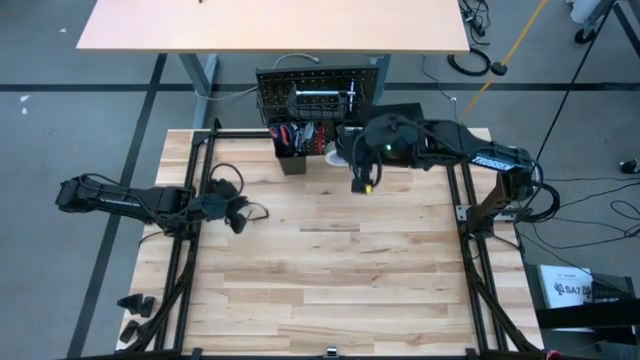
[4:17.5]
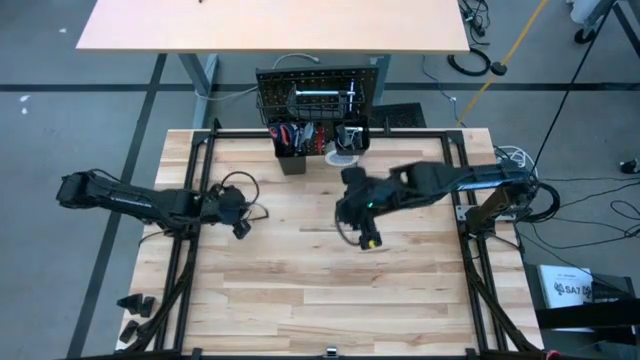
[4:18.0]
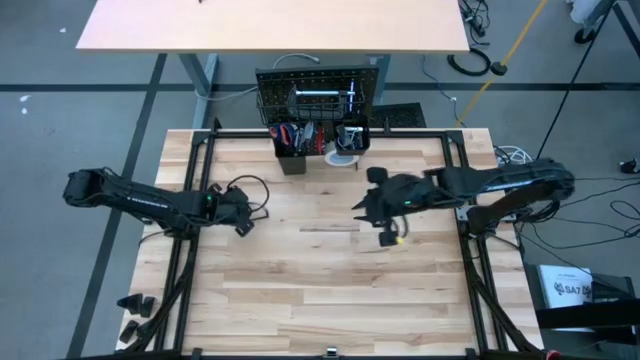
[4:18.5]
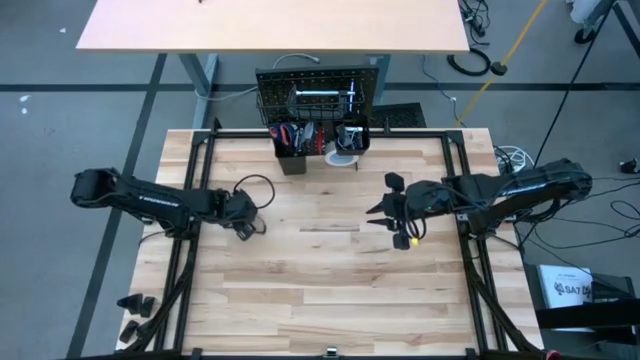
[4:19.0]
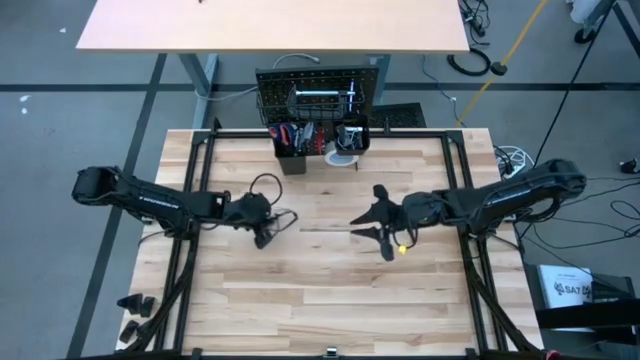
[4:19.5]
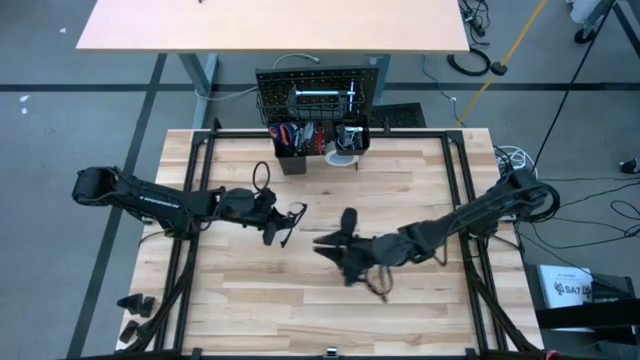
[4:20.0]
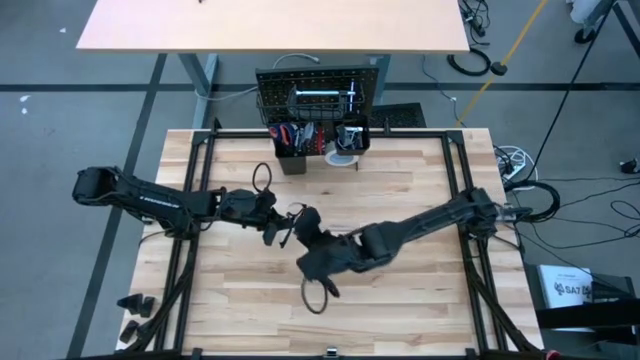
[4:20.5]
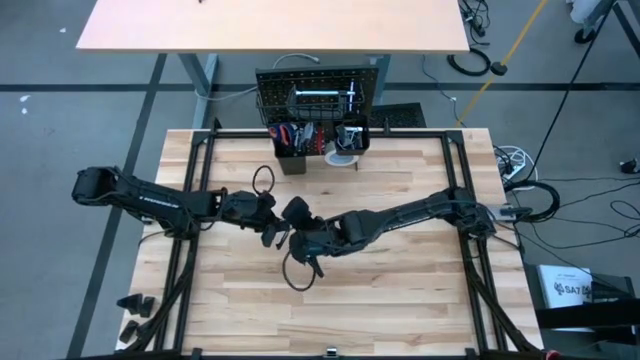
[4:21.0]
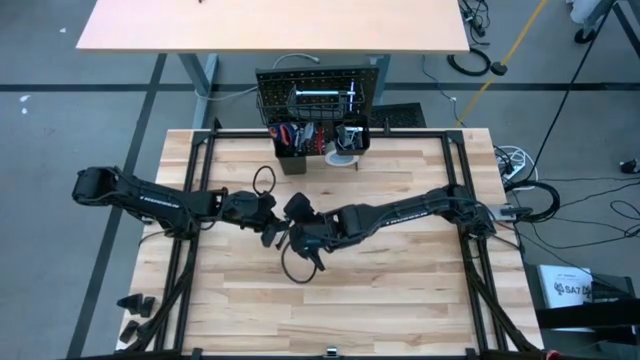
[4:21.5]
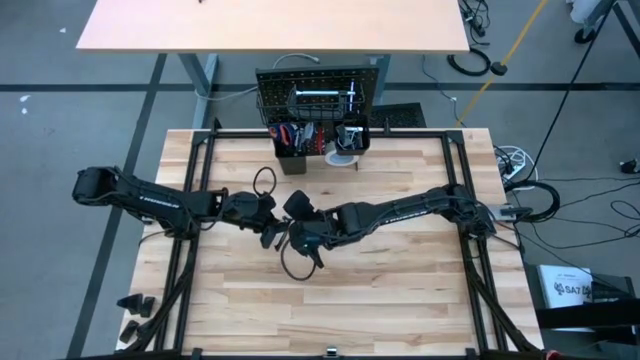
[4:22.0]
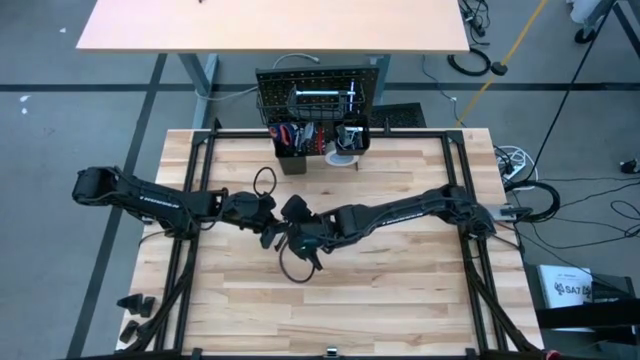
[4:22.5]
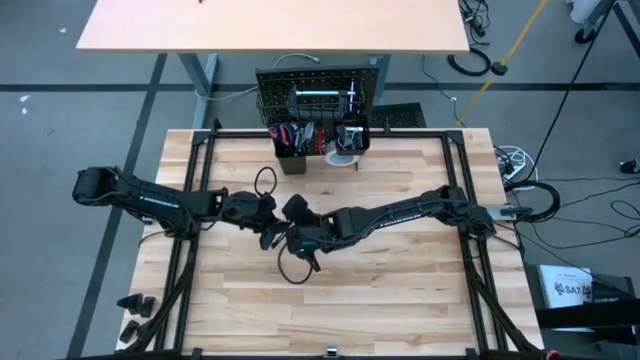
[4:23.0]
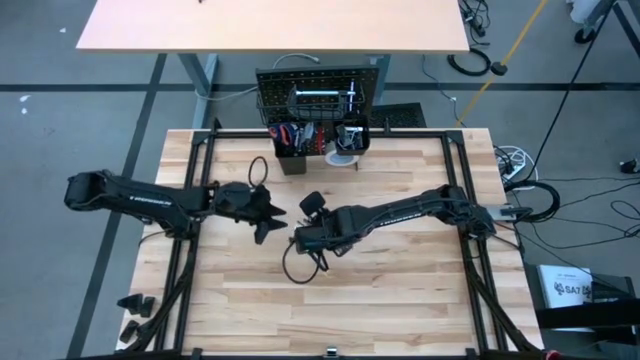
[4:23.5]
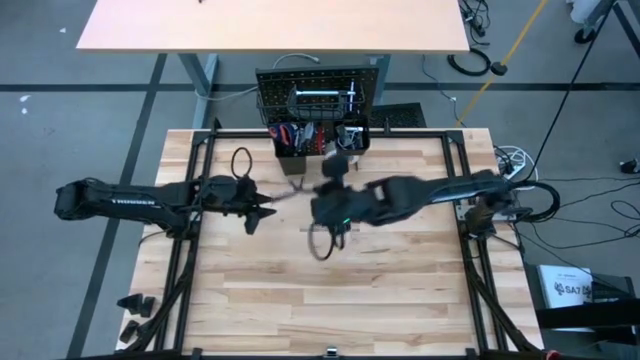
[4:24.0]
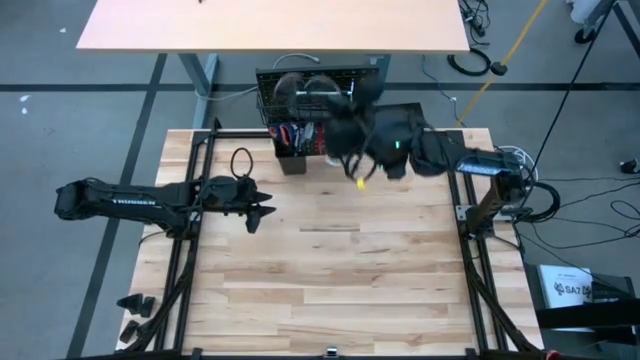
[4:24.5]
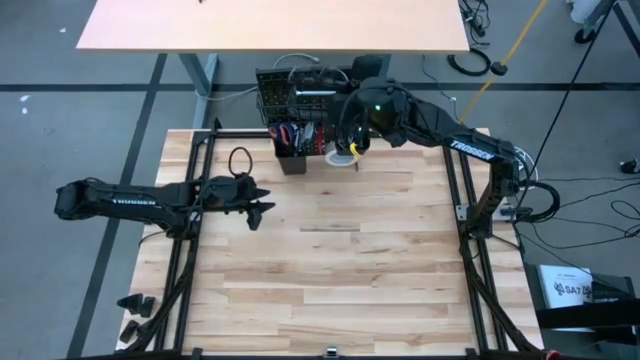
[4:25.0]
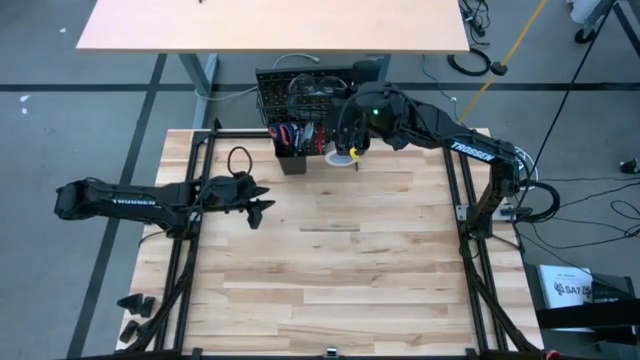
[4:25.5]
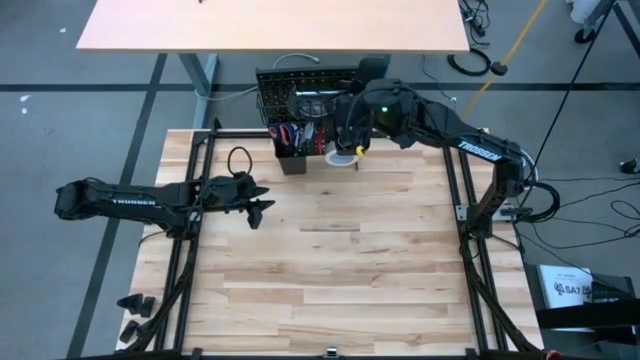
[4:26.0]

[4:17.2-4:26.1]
Task: Hang tools onto peg board
Put the eye glasses on the black basket on the peg board

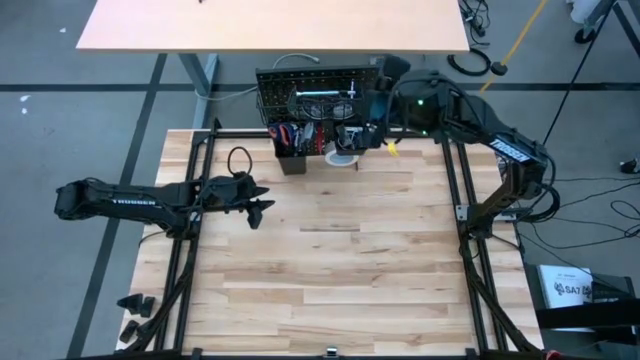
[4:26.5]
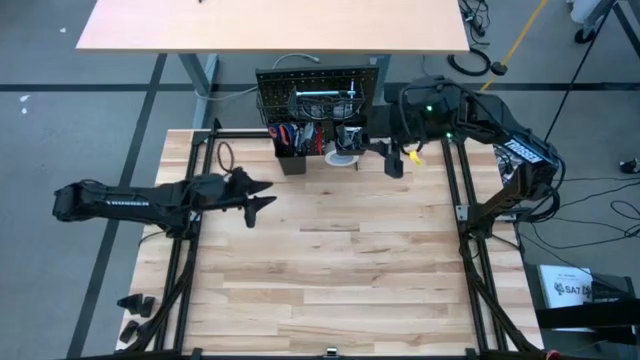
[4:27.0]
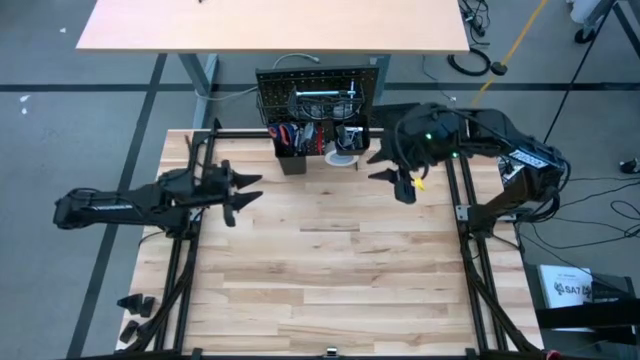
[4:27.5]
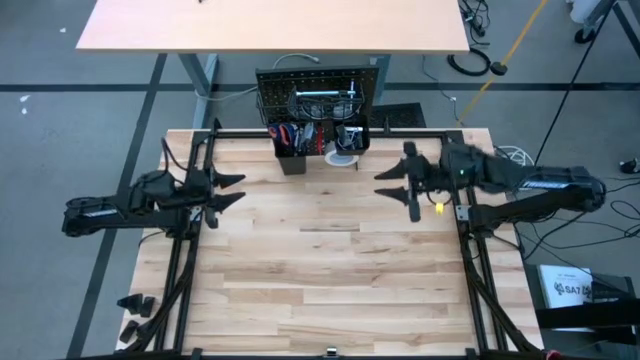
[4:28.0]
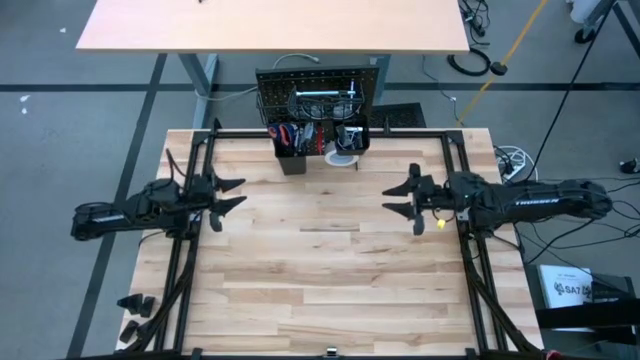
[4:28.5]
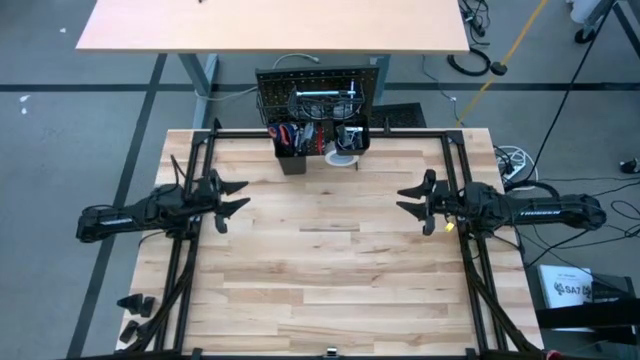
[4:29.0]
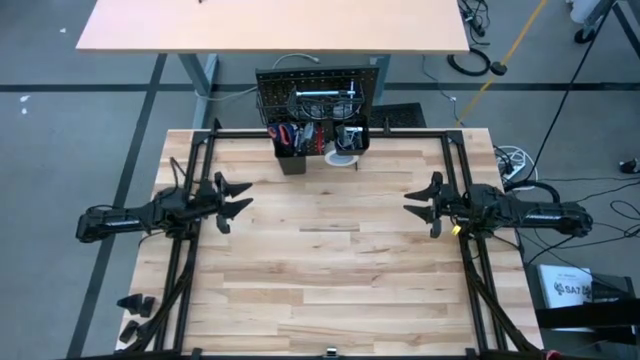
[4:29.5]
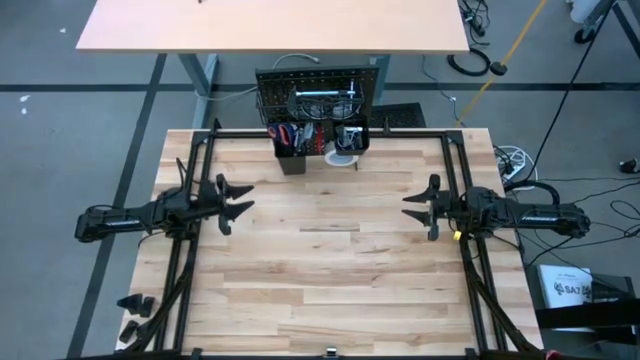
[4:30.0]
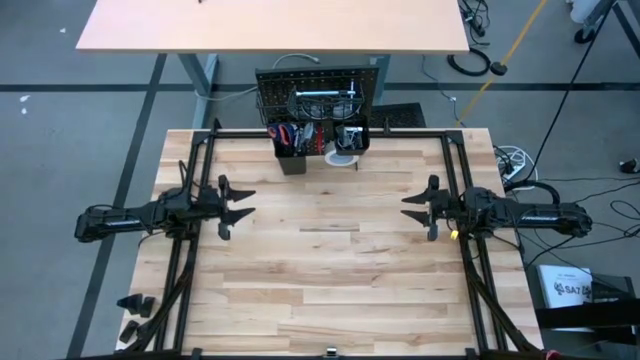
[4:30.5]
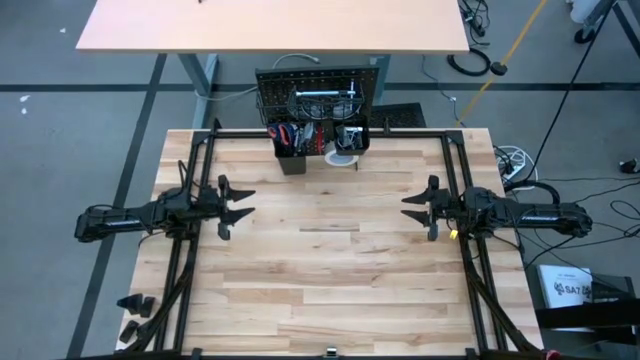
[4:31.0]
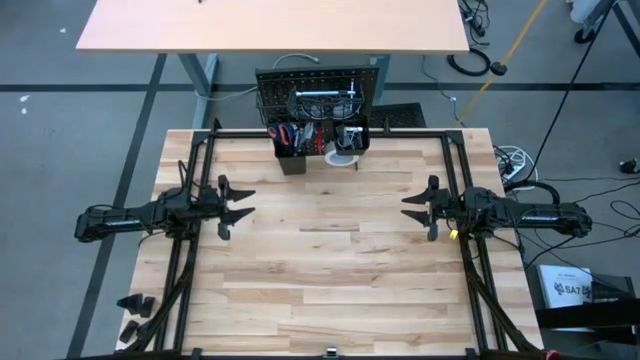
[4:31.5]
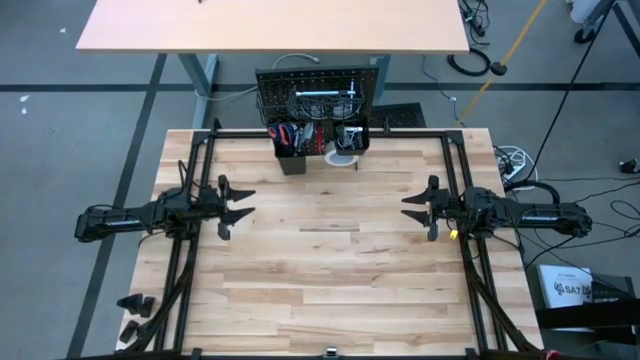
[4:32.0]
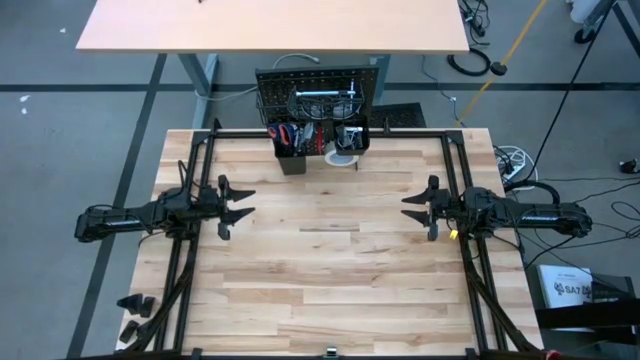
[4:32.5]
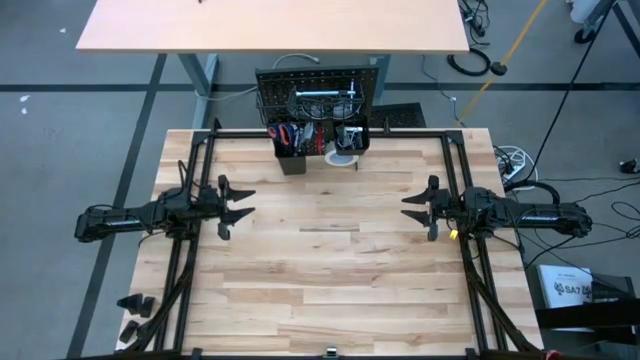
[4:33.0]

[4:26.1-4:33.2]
Return to Home Position

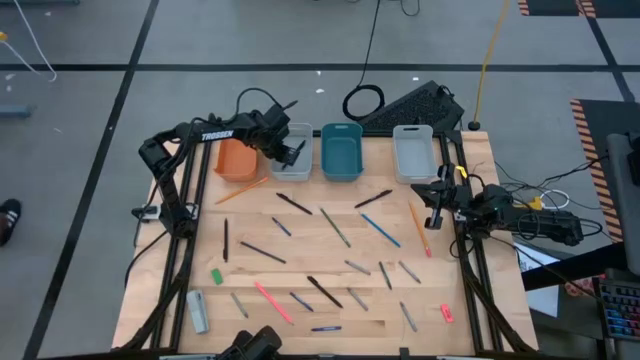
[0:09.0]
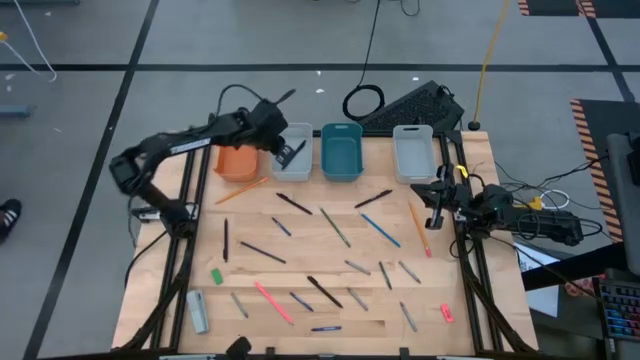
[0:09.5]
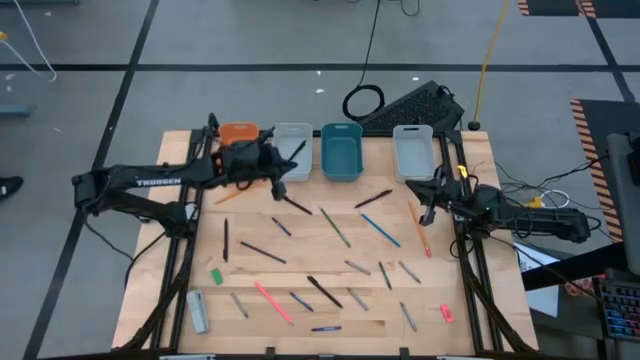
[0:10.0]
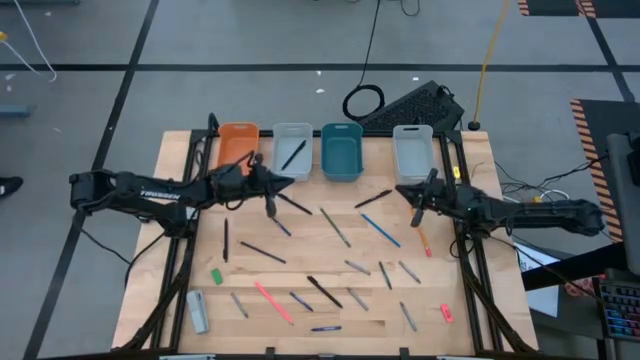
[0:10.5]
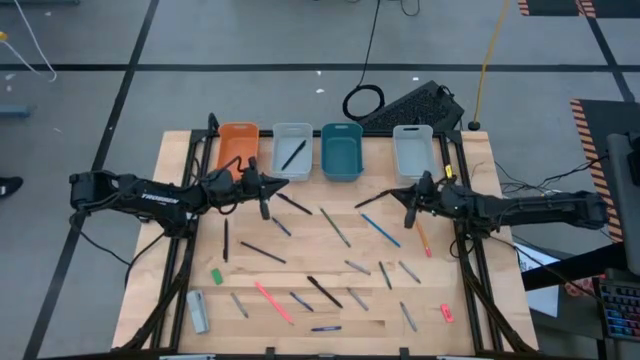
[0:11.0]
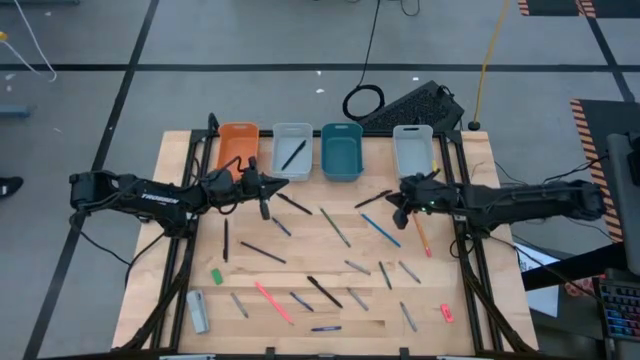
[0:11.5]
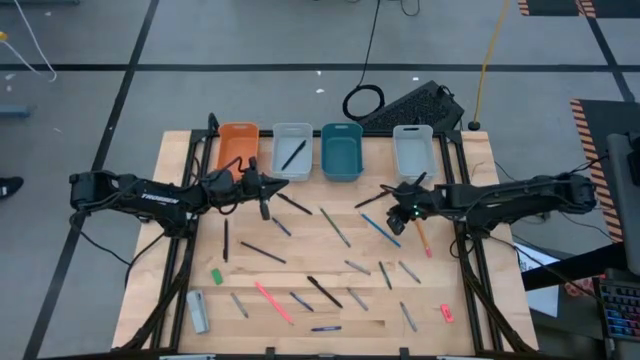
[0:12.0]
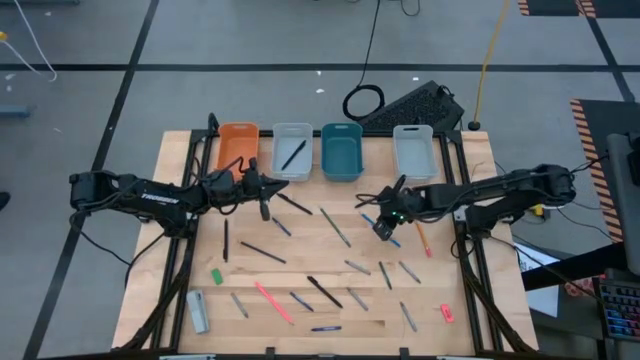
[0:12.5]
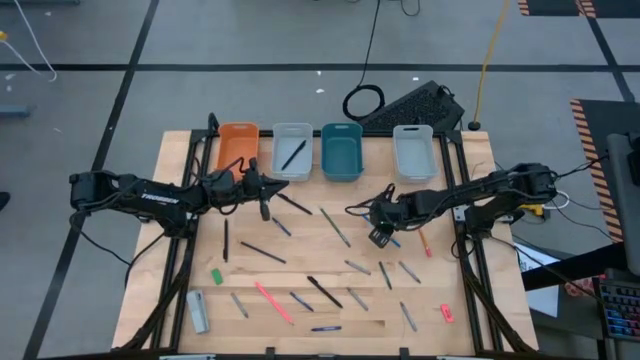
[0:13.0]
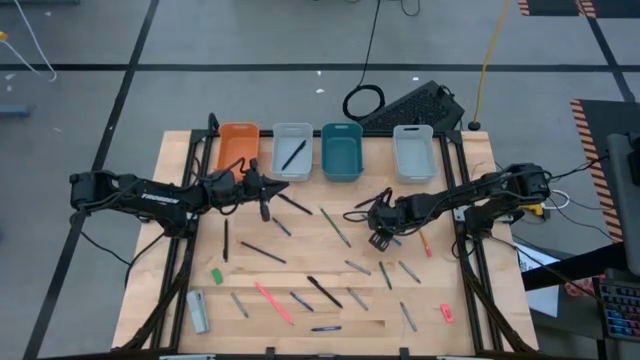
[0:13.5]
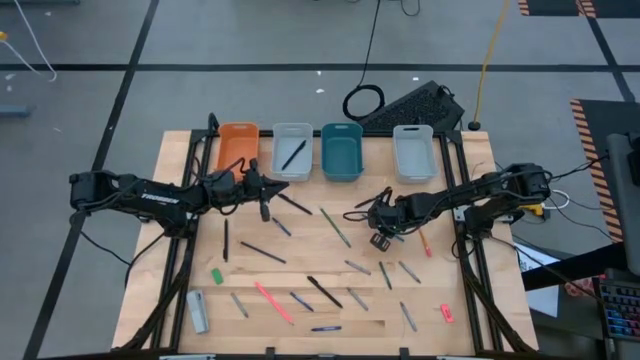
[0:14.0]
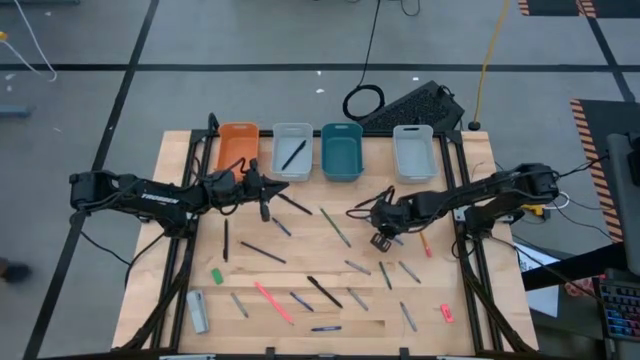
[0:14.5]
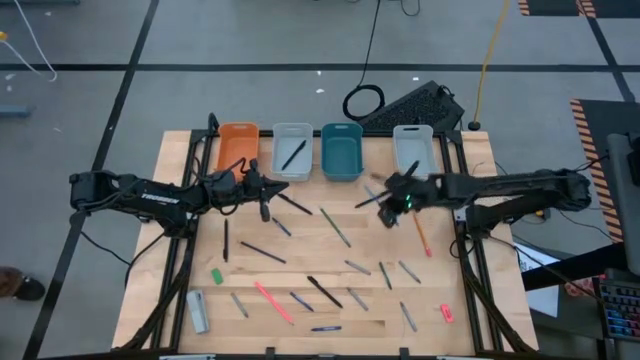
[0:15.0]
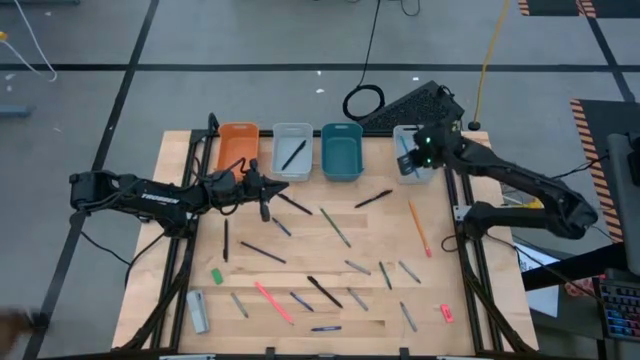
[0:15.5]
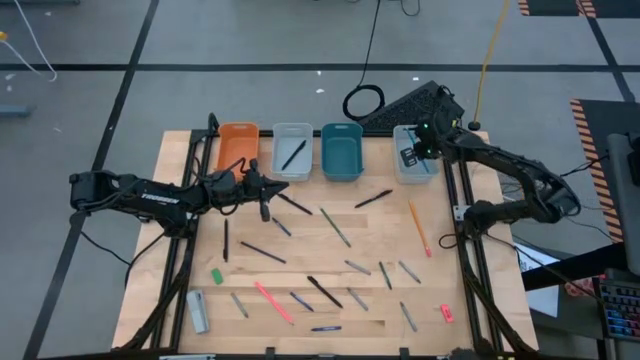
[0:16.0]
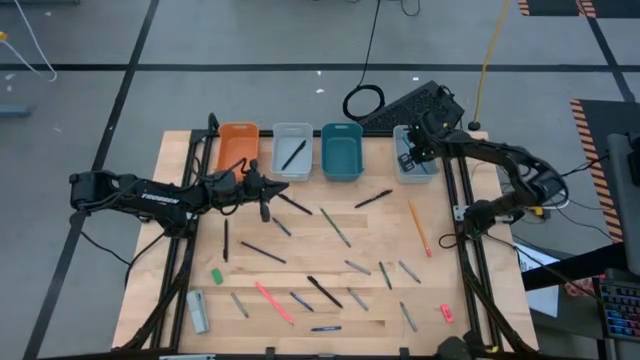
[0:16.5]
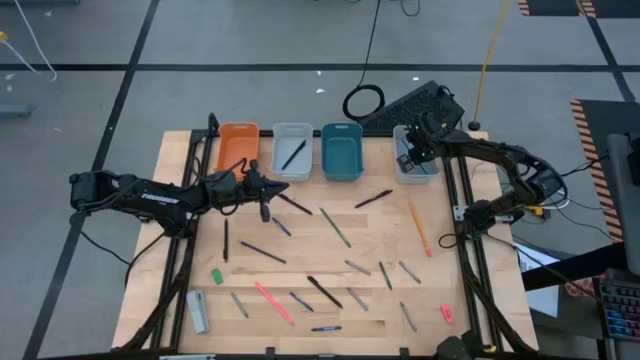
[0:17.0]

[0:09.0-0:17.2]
Task: Sort crayons/erasers/pens/pencils in bins
Put the blue colored pencil into the right gray bin
